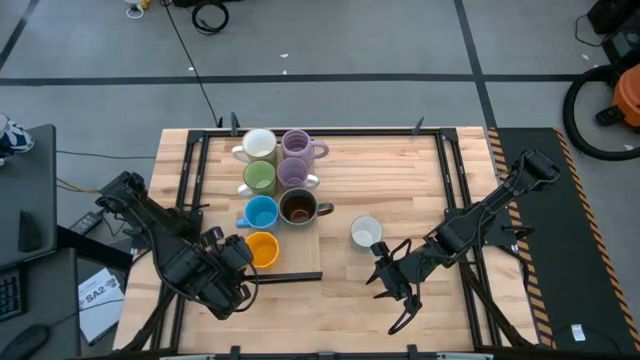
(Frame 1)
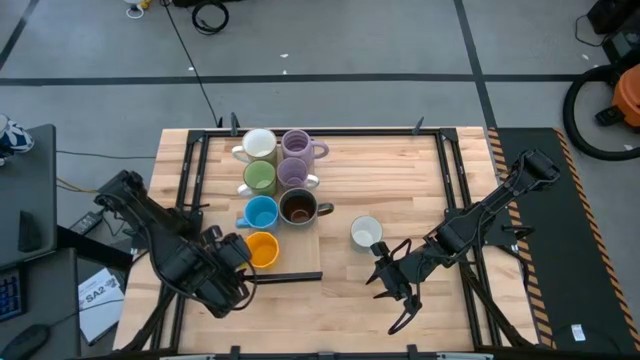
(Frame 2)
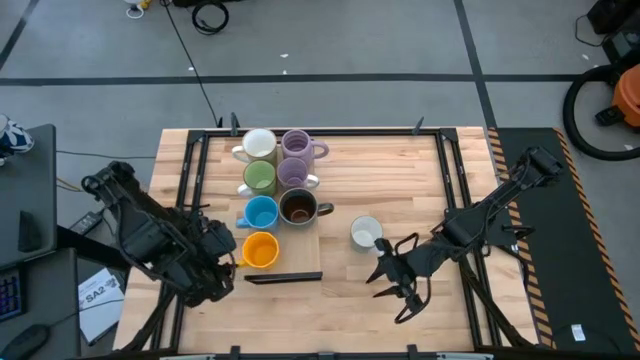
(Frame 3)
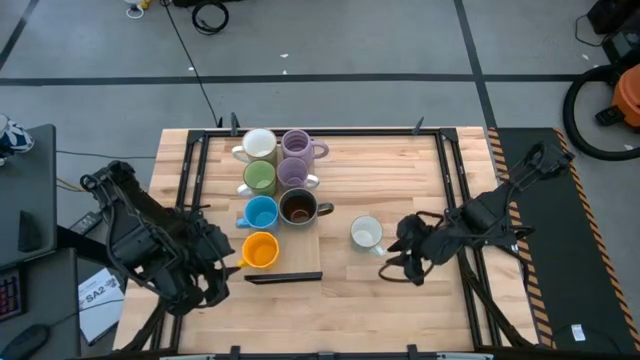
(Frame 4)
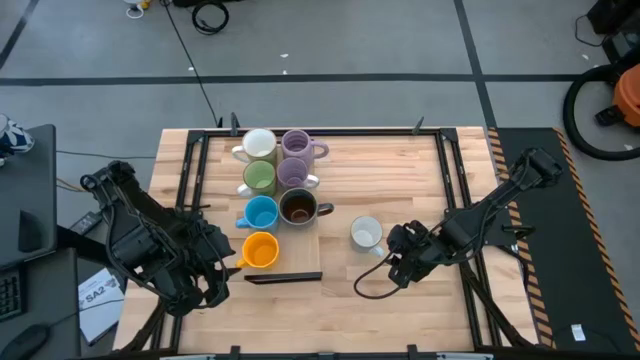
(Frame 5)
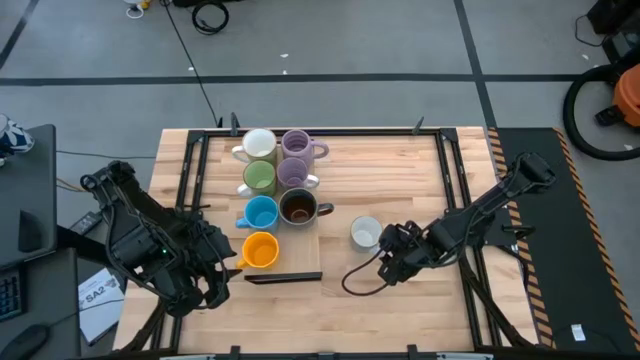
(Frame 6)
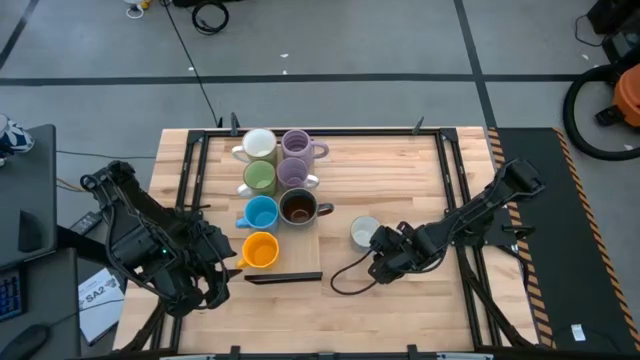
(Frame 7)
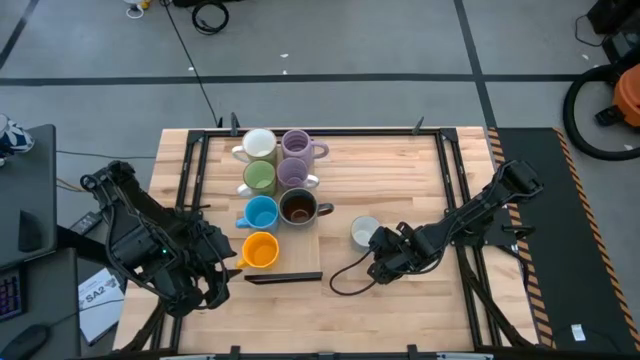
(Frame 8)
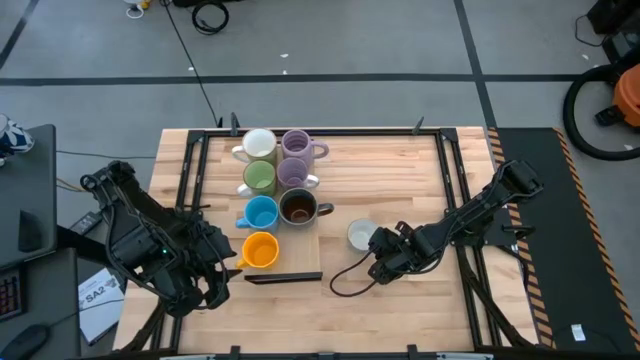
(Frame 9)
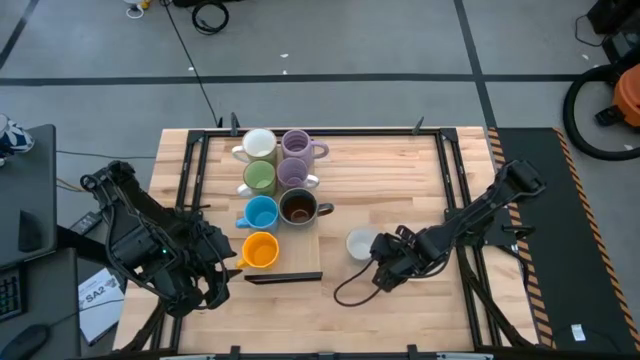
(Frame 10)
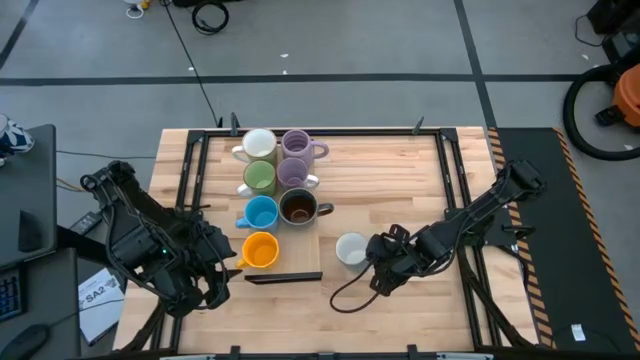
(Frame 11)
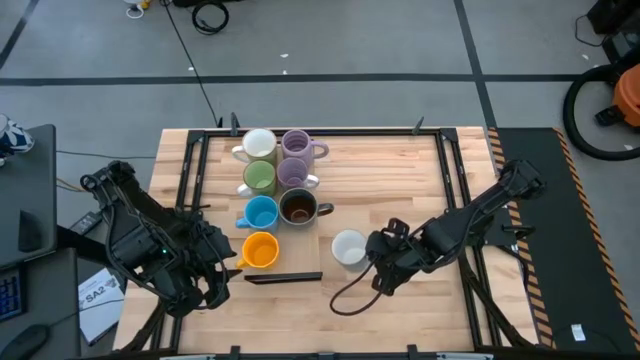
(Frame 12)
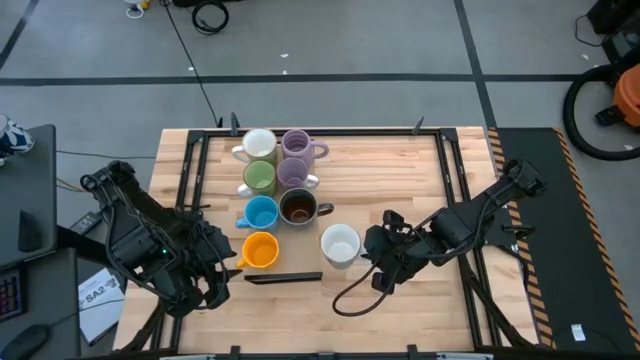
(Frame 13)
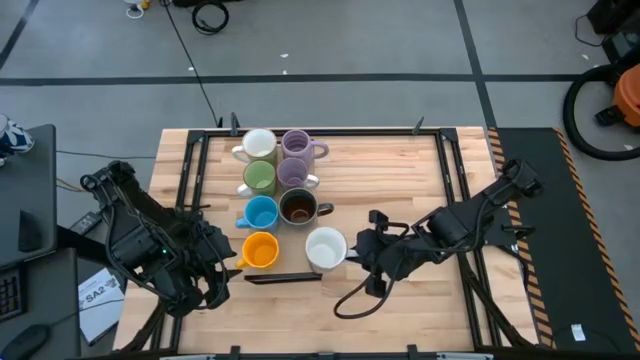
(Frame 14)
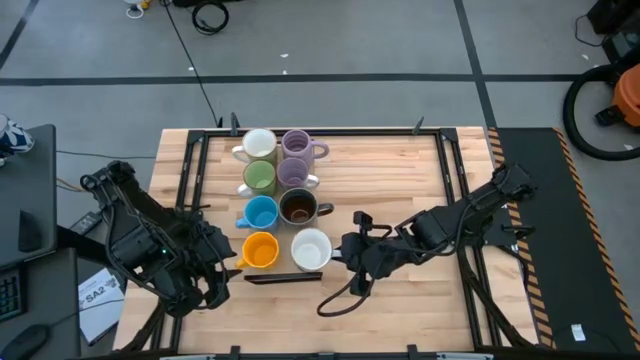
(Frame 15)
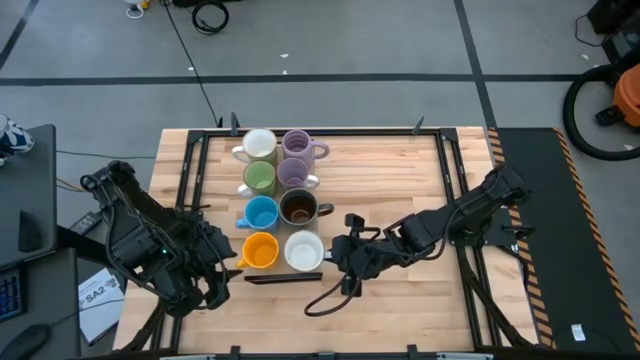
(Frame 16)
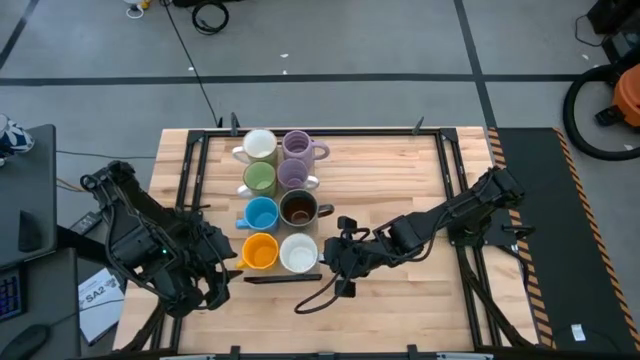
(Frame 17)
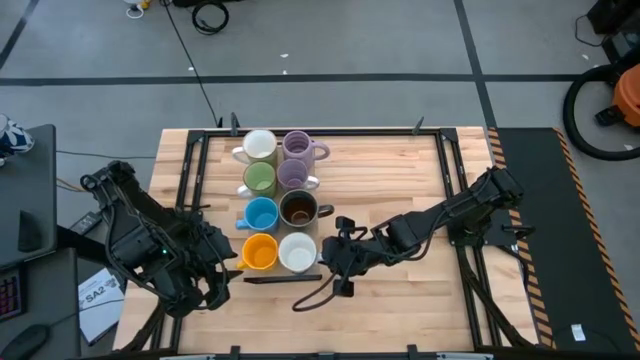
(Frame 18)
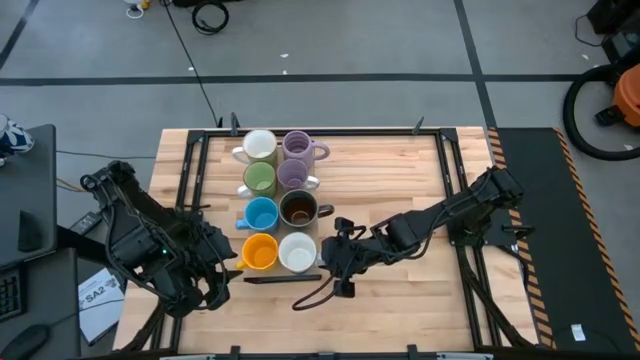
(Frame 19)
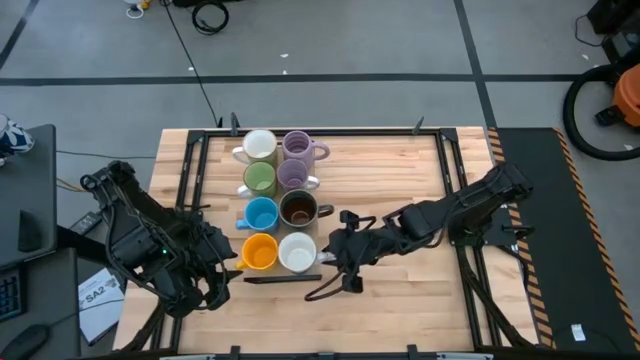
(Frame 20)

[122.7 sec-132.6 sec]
Task: Place coffee mugs
Put the light blue mug on the shelf

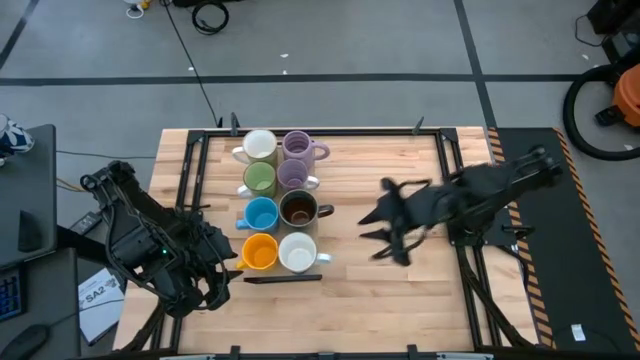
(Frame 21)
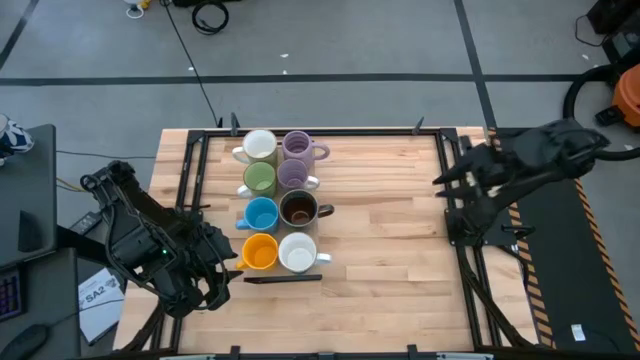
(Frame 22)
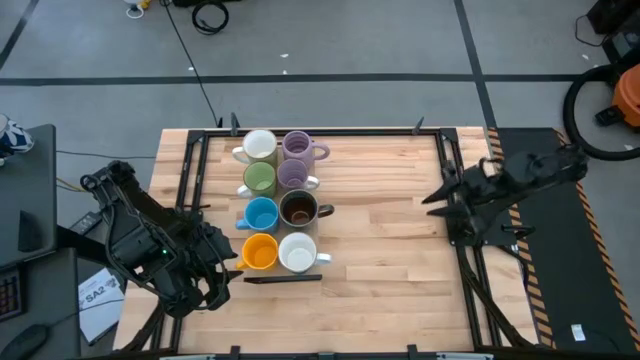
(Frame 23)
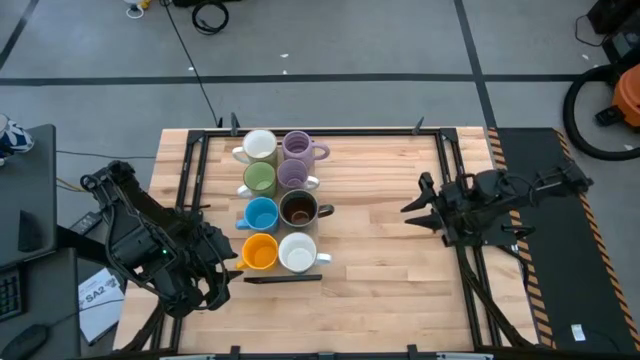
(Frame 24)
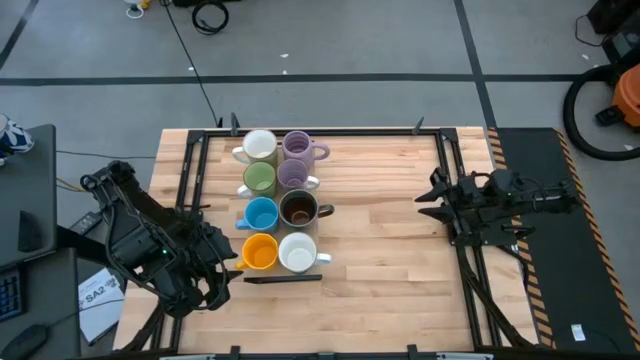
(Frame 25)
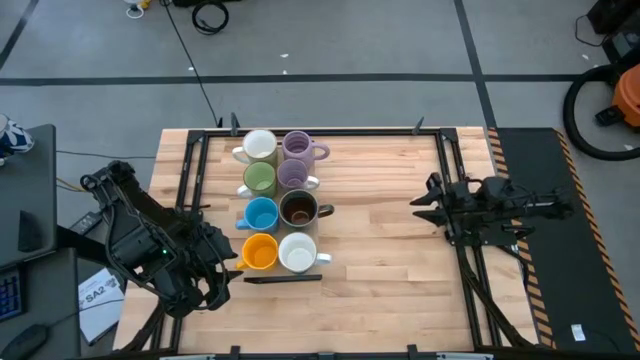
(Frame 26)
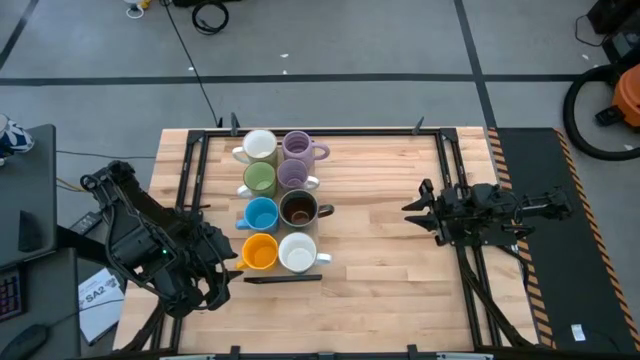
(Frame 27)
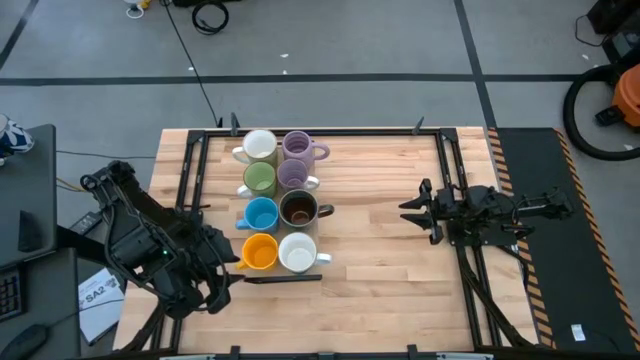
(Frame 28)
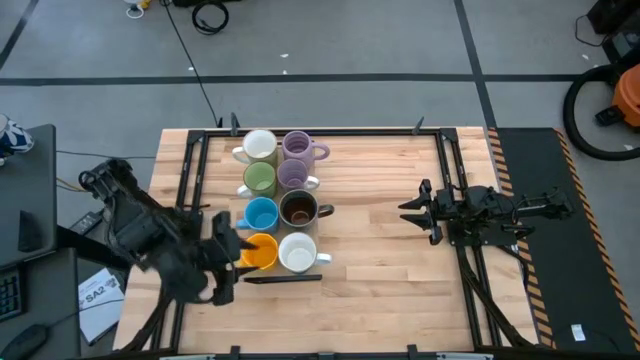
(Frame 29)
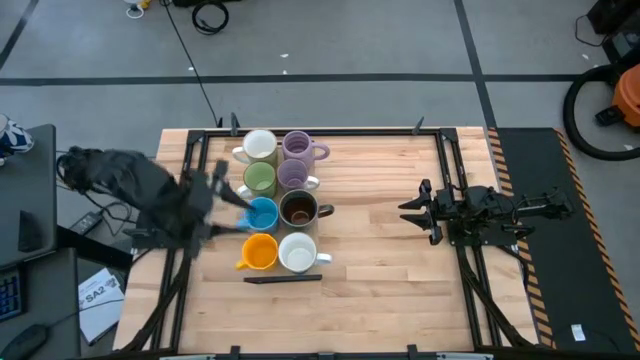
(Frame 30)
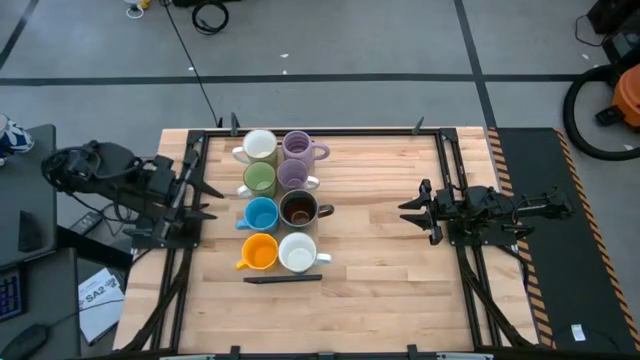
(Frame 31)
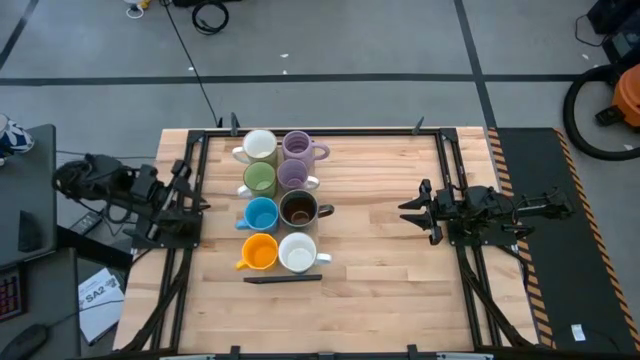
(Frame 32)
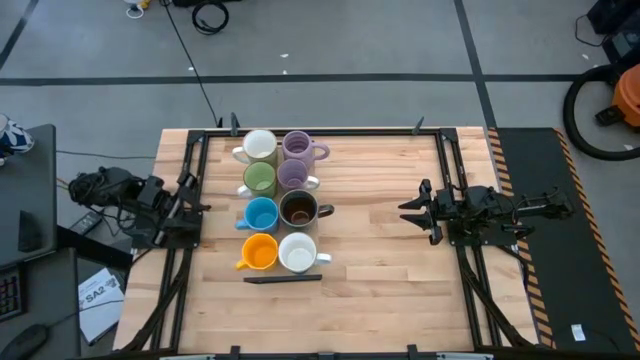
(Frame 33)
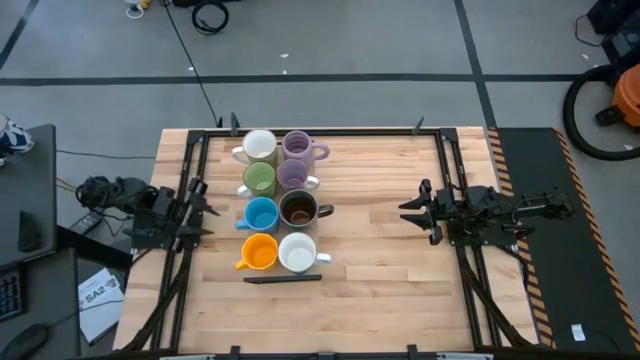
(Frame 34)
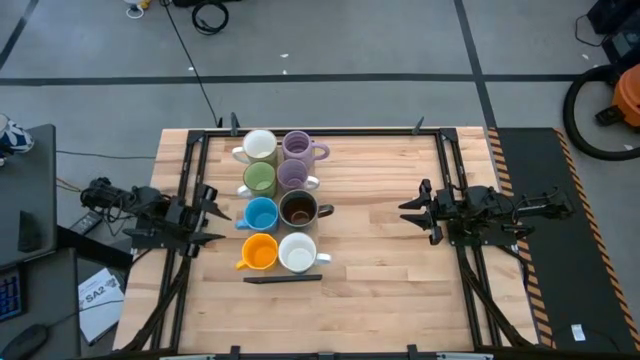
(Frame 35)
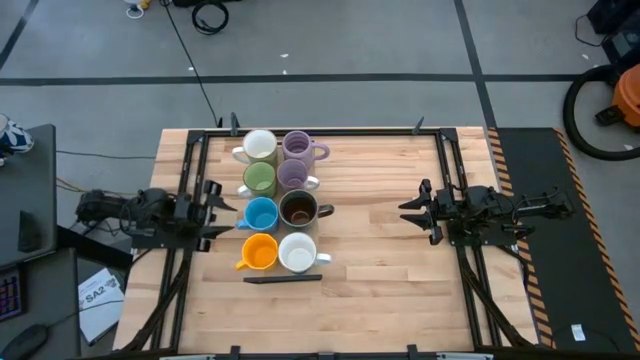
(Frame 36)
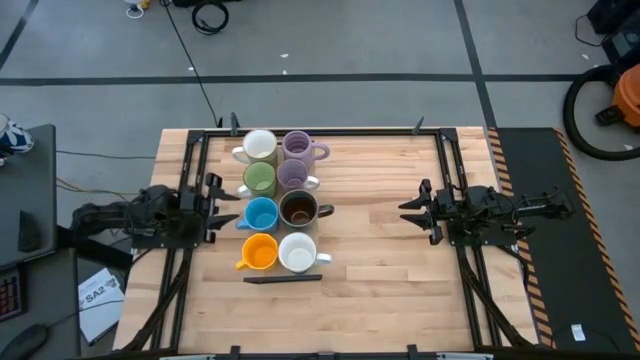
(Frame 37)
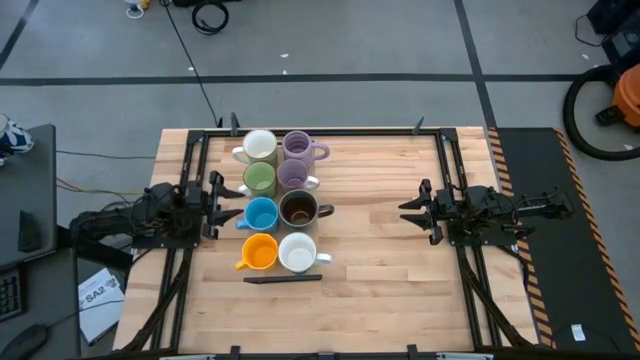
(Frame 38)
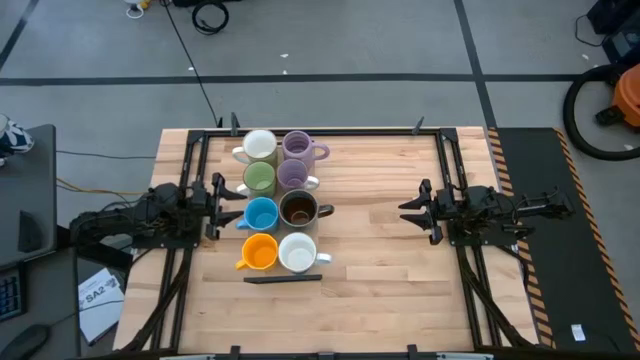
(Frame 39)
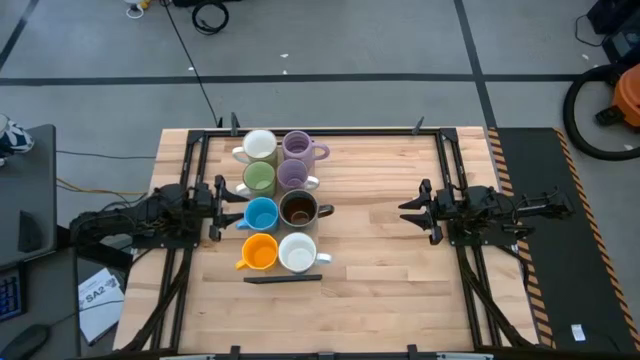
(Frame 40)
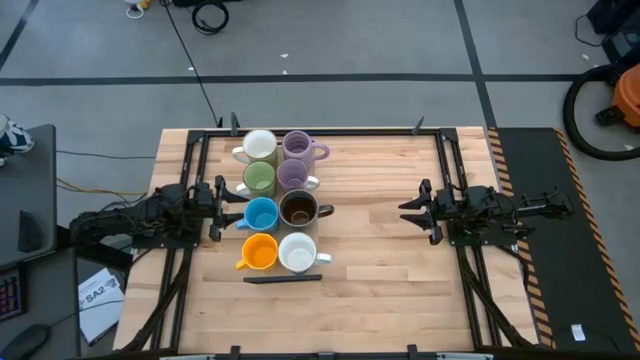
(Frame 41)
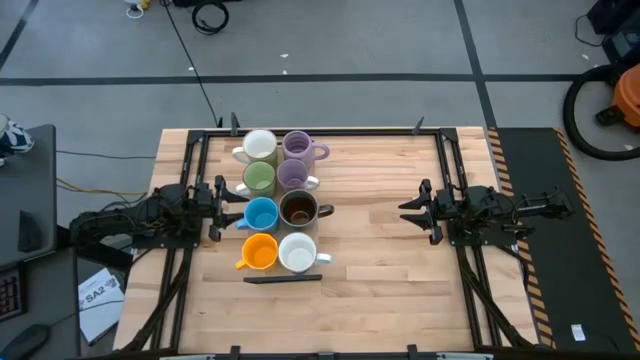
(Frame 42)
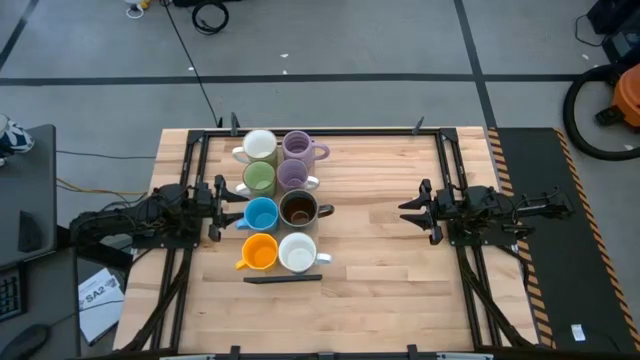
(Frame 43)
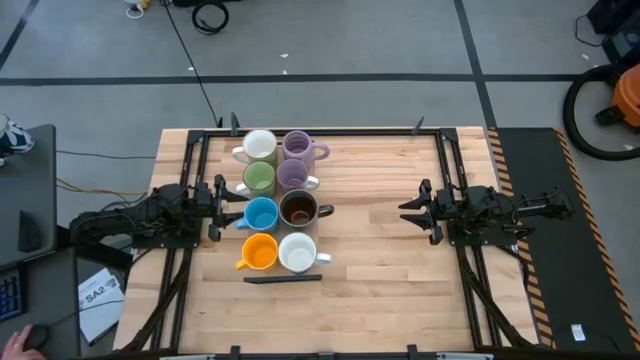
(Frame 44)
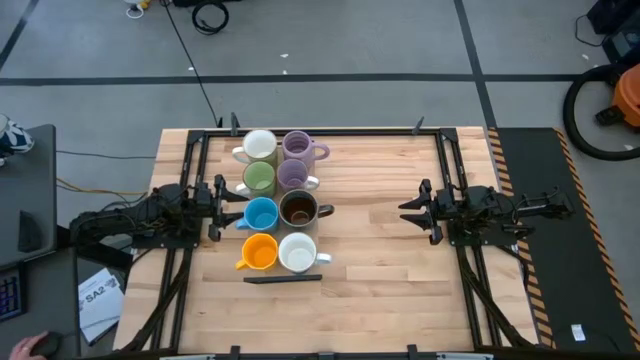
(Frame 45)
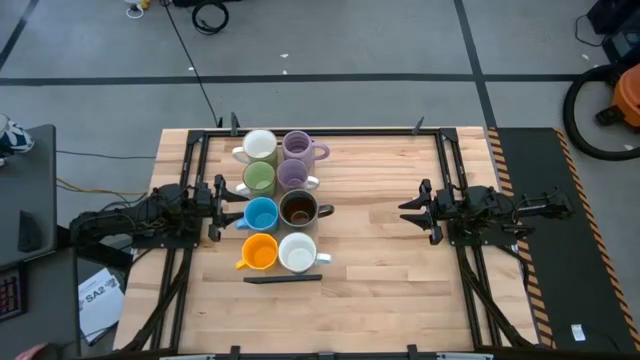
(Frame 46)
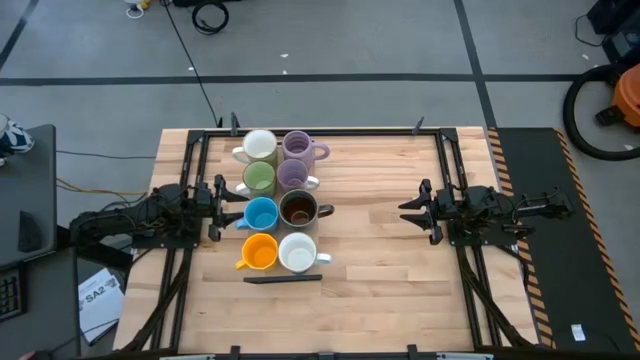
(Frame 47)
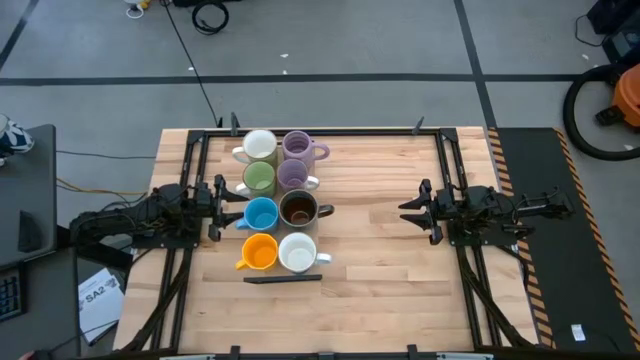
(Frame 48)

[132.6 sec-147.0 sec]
Return to Home Position
